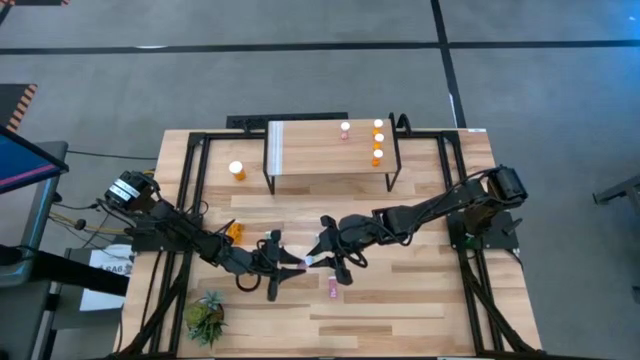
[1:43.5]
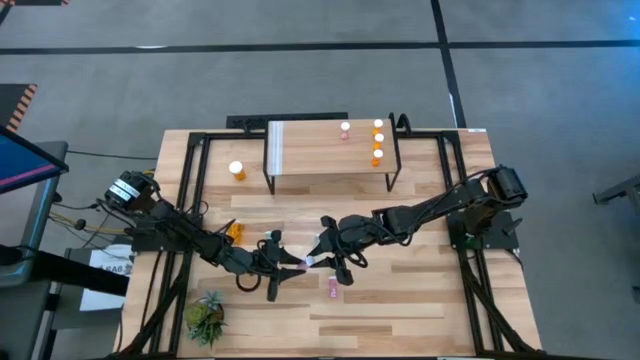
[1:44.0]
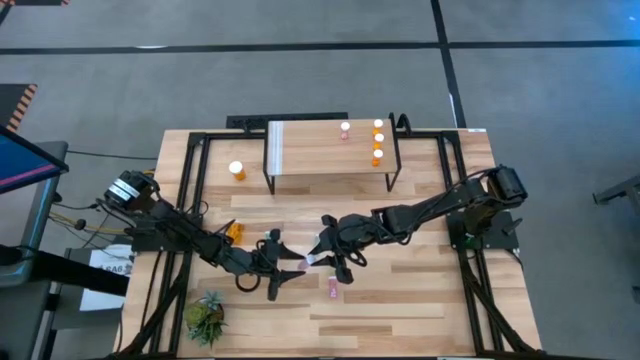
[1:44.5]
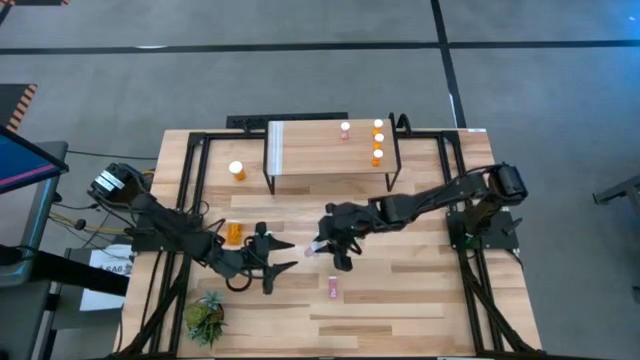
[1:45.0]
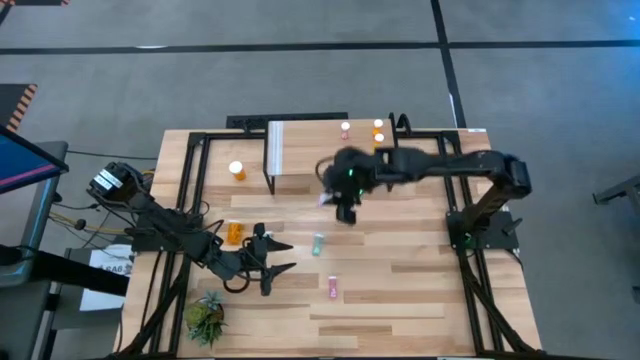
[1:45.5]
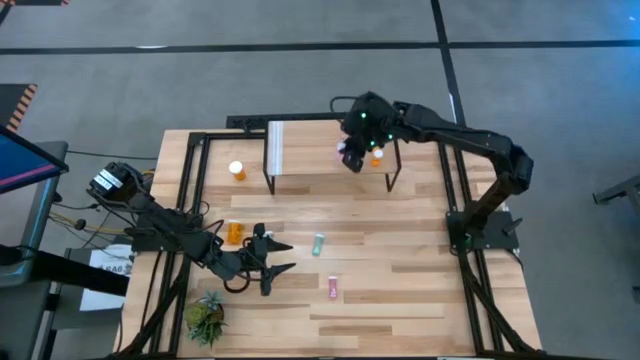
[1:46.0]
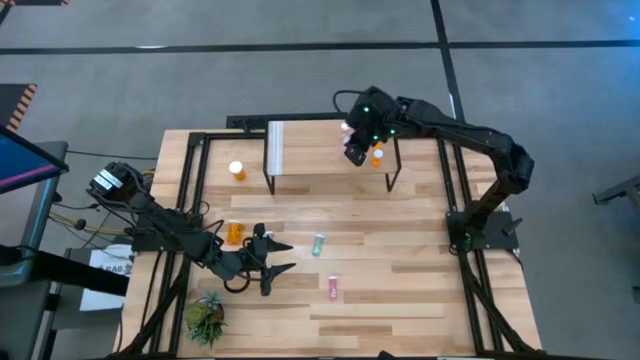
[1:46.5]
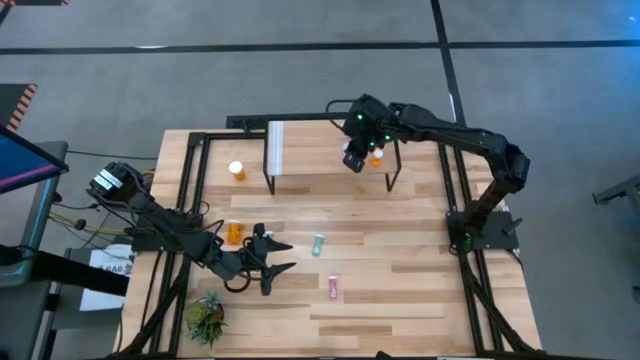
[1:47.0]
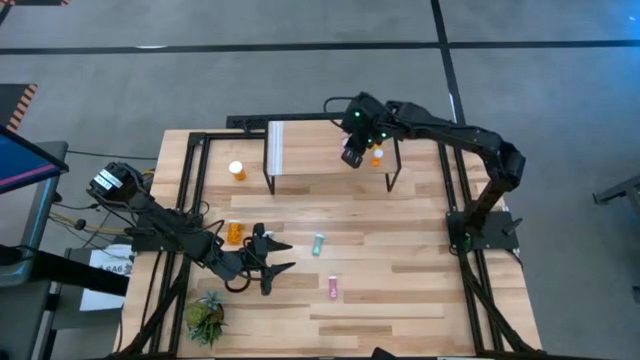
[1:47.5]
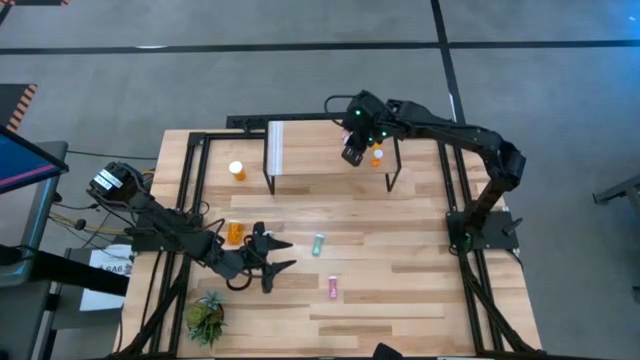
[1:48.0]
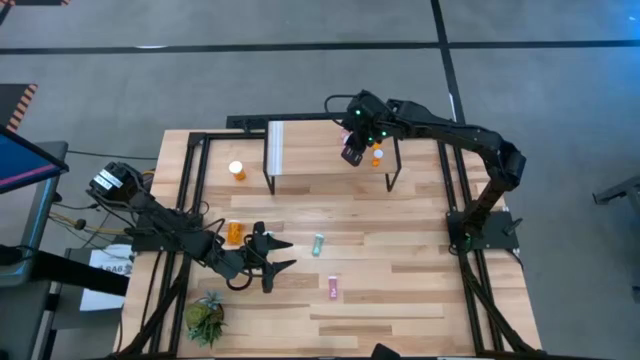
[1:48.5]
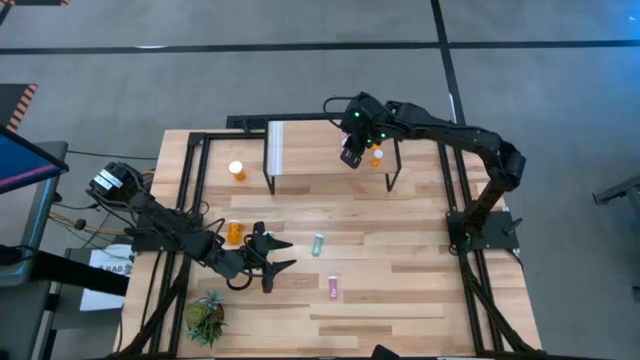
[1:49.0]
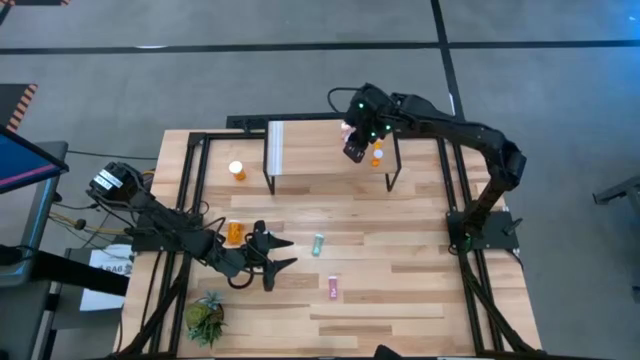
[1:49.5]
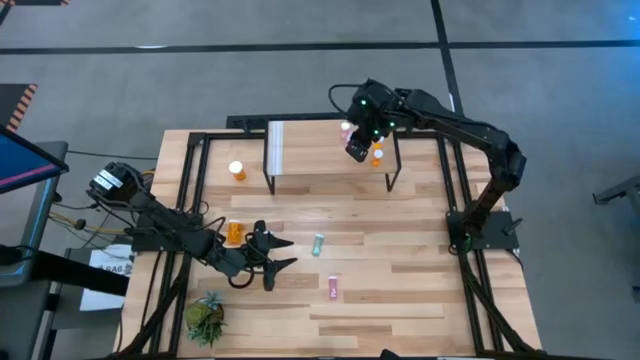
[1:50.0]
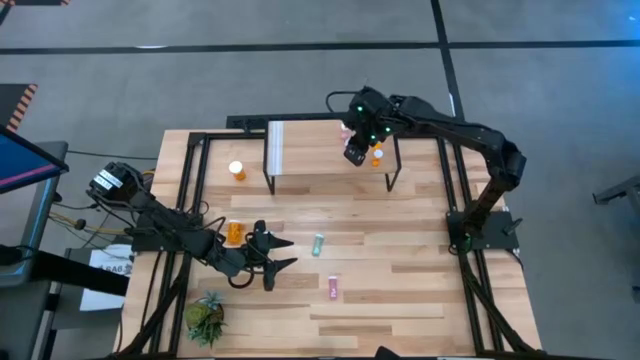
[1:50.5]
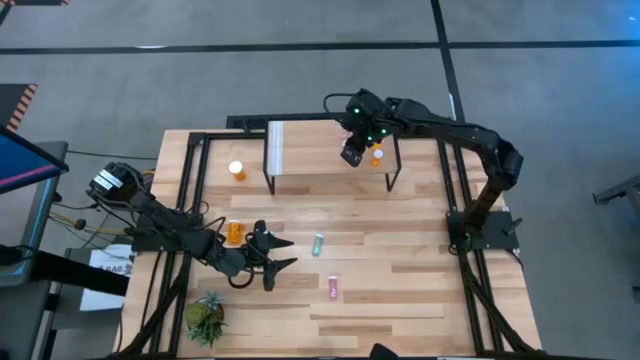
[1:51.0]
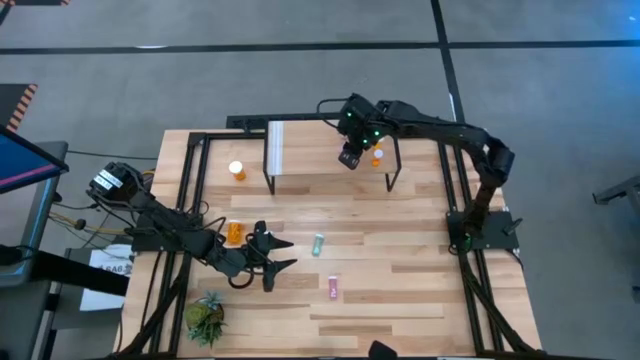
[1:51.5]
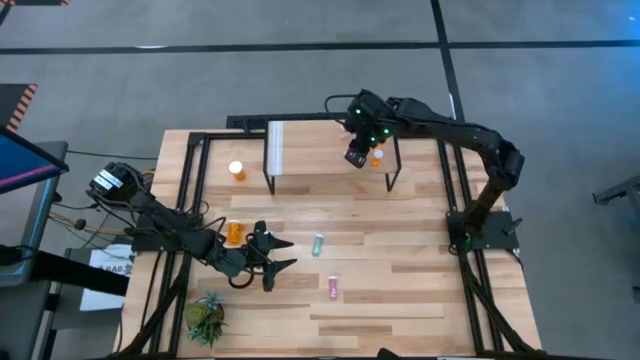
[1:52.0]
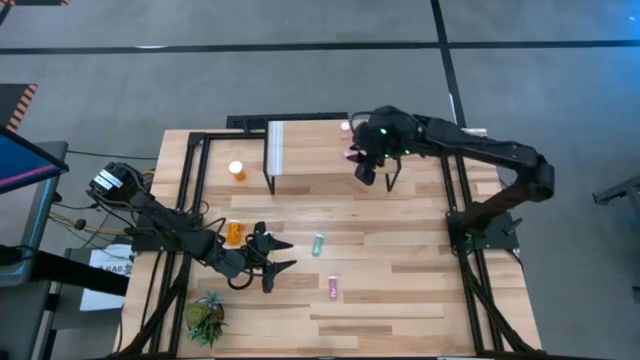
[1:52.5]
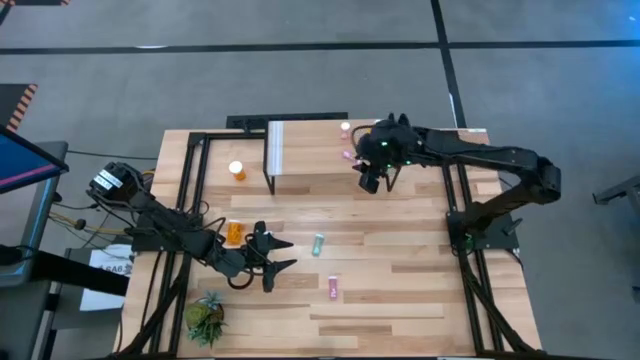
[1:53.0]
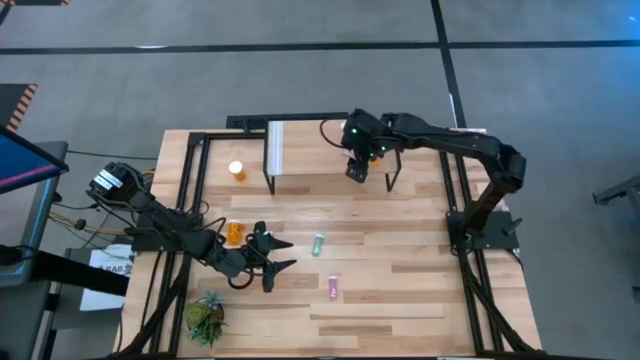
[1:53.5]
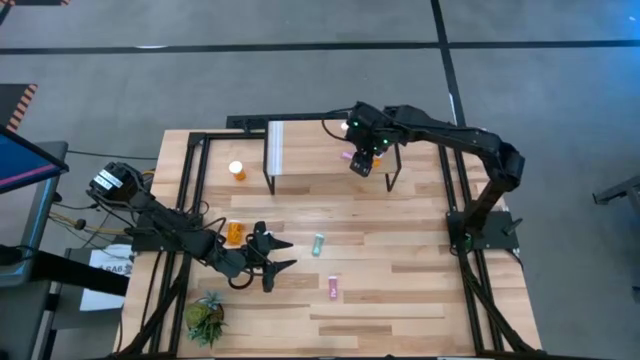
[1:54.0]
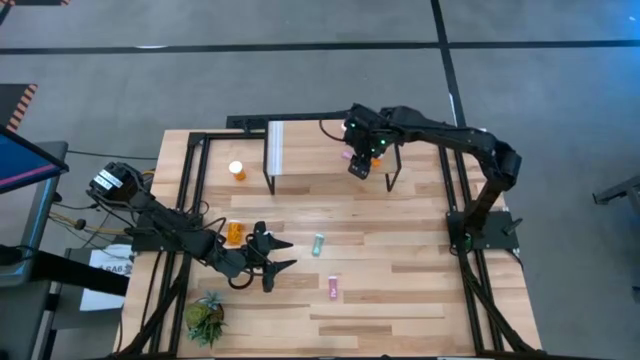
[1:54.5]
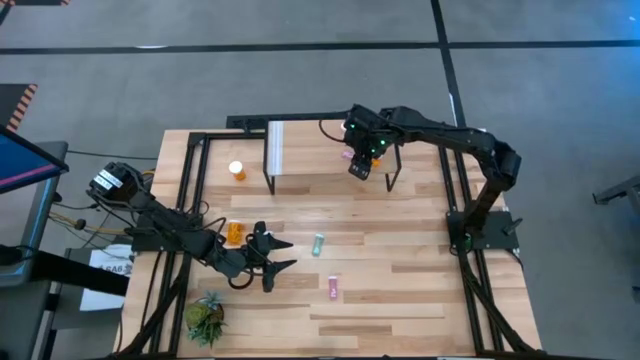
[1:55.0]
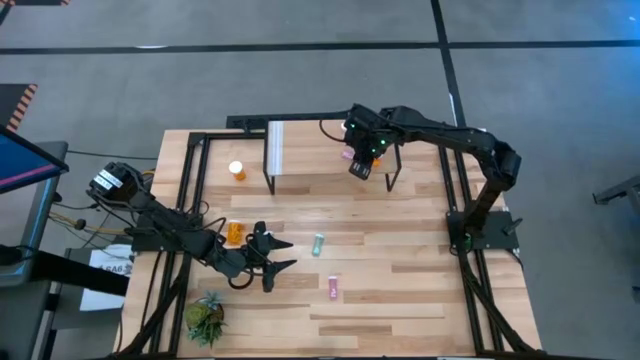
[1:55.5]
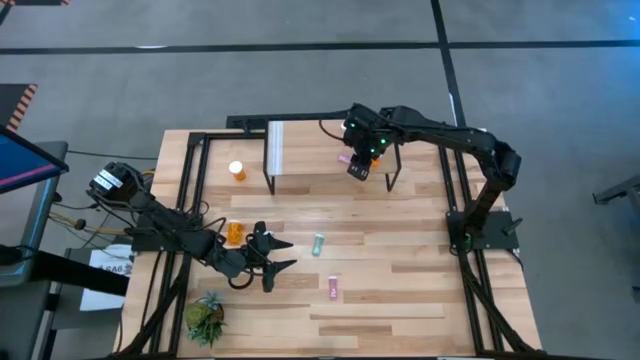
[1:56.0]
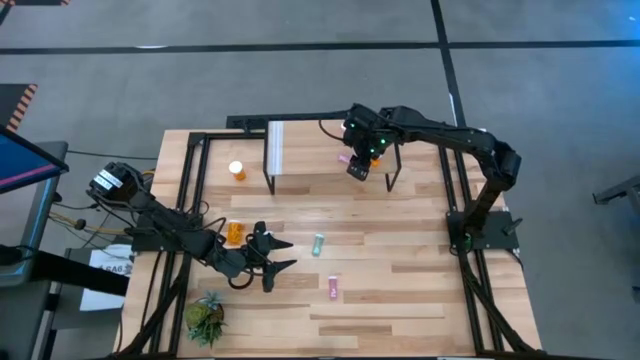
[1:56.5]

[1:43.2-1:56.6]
Task: Pick and place medicine bottles onto shelf by color
Put the left pink pill bottle on the shelf aligned with the other pink pill bottle

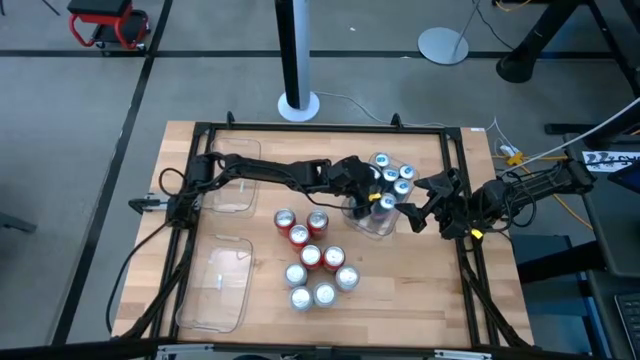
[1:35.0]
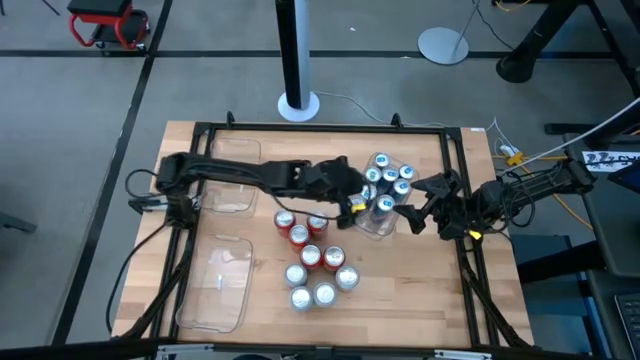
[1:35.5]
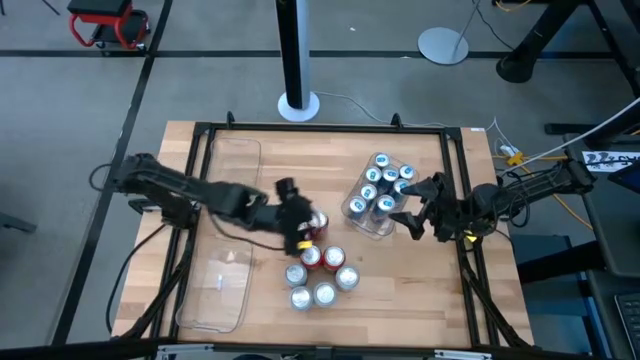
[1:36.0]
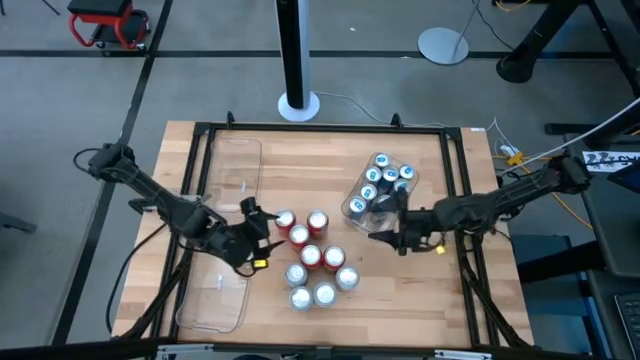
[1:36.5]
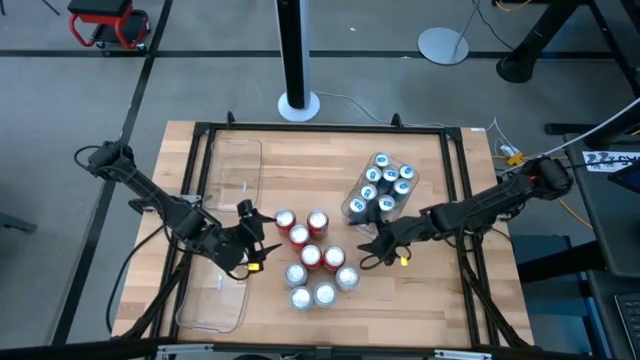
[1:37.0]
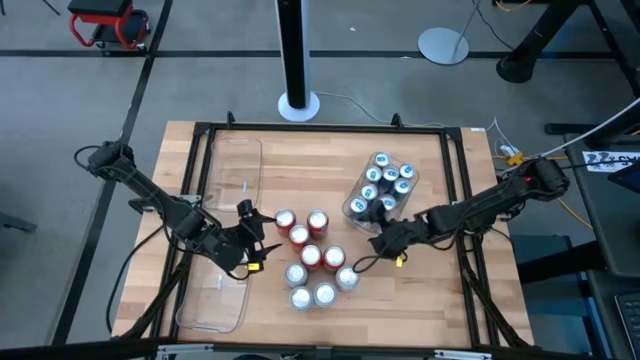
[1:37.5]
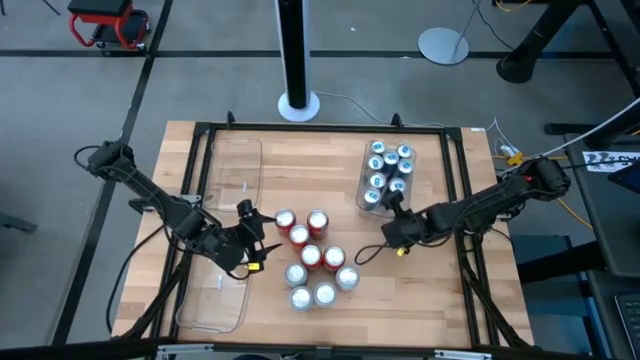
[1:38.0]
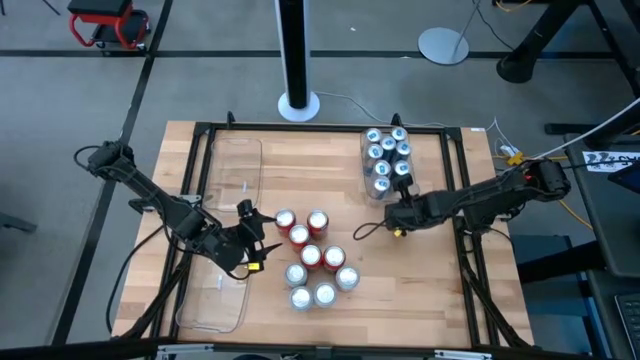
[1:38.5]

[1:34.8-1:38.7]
Task: Sort soda cans
Move the middle right transparent bin to the top right of the table

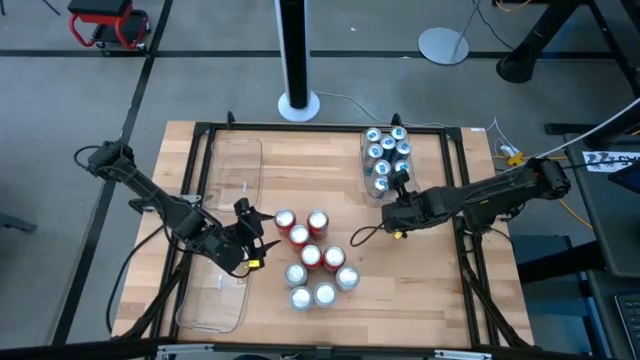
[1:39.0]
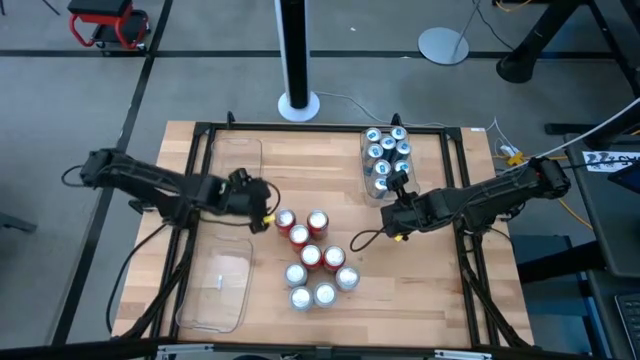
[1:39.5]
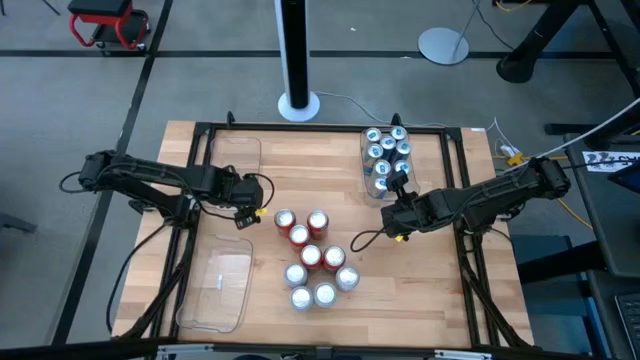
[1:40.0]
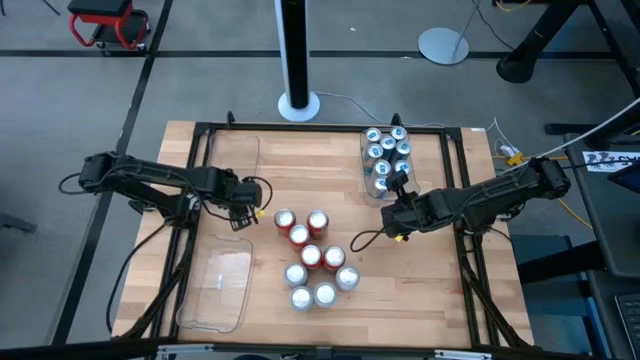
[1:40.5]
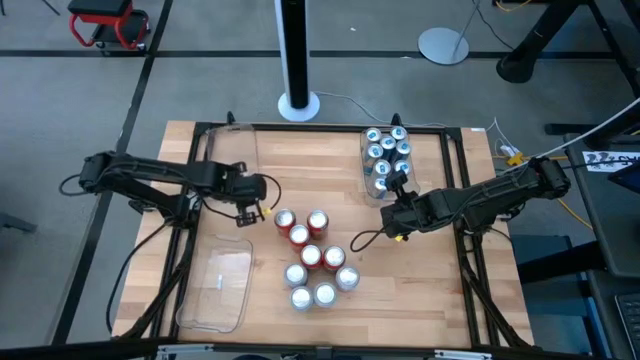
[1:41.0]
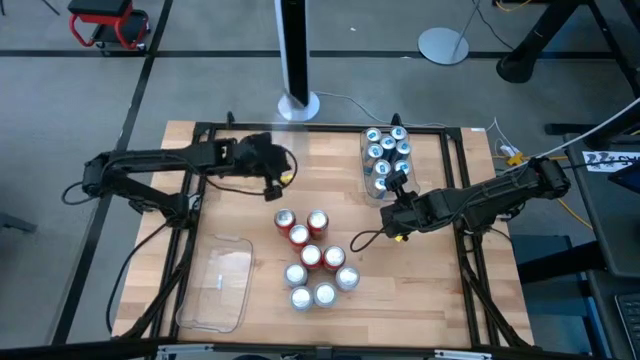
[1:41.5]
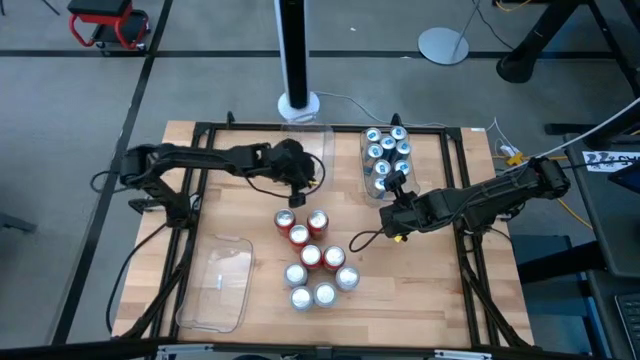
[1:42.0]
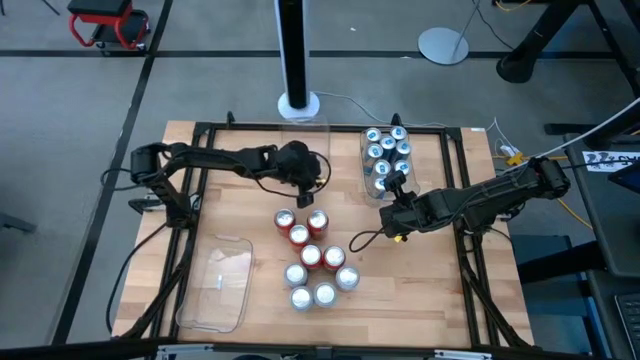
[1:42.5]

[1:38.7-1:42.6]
Move the top left transparent bin to the top center of the table
